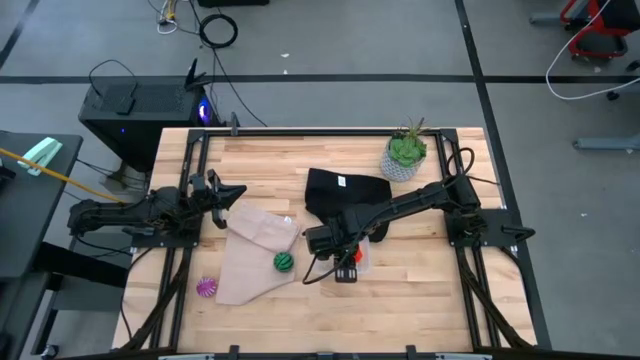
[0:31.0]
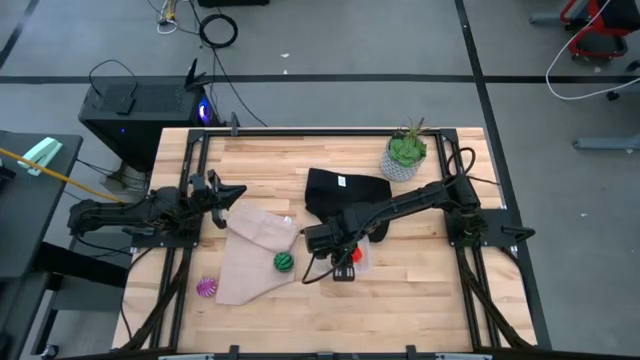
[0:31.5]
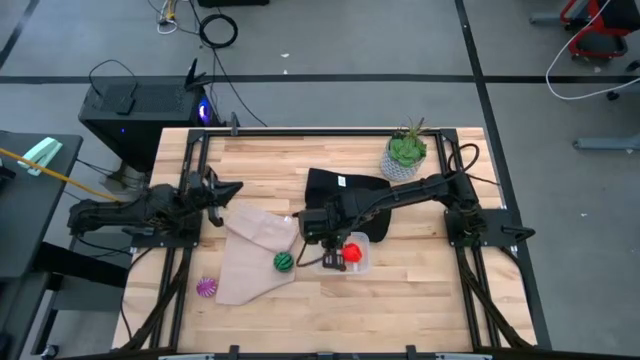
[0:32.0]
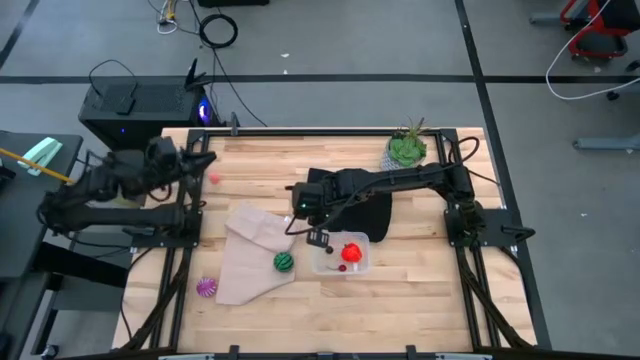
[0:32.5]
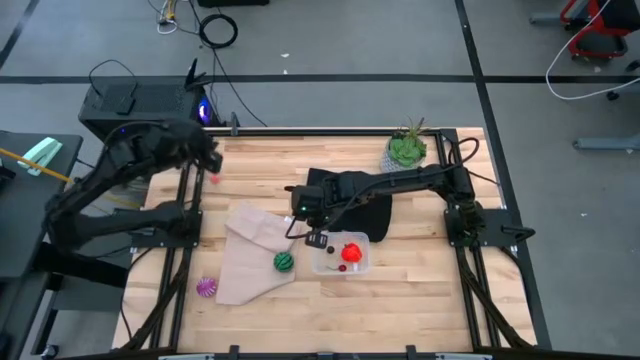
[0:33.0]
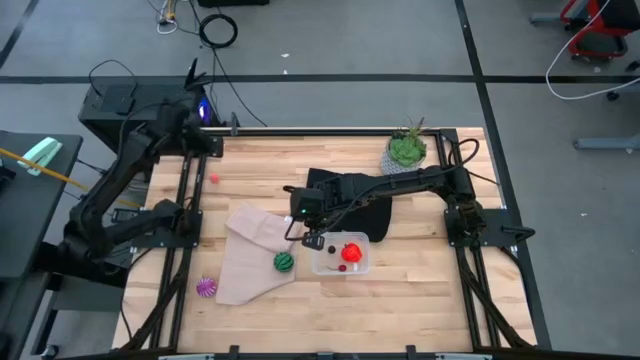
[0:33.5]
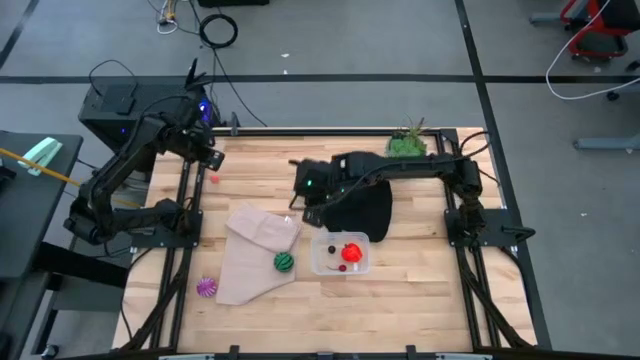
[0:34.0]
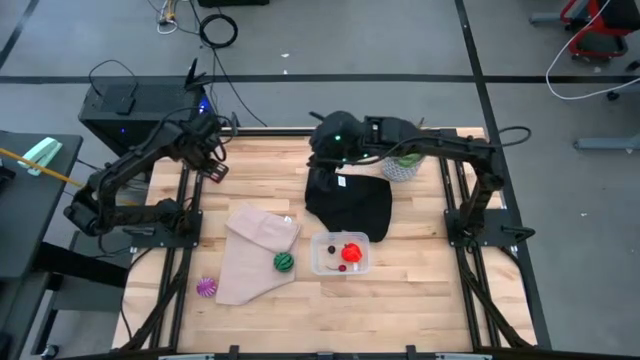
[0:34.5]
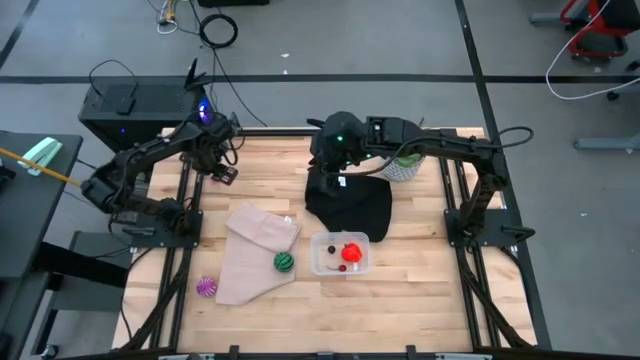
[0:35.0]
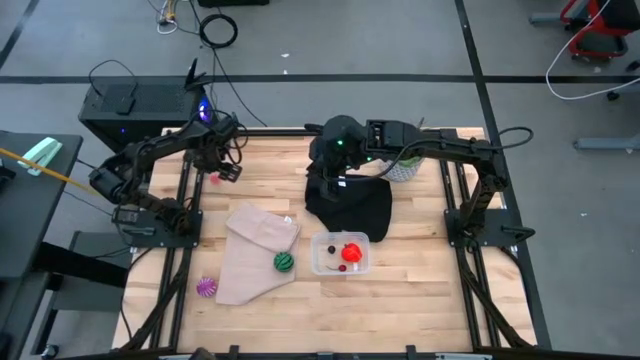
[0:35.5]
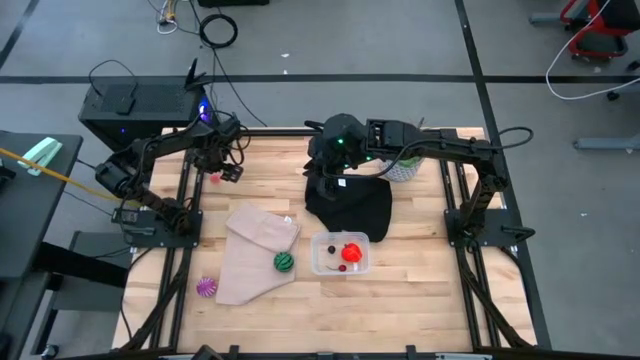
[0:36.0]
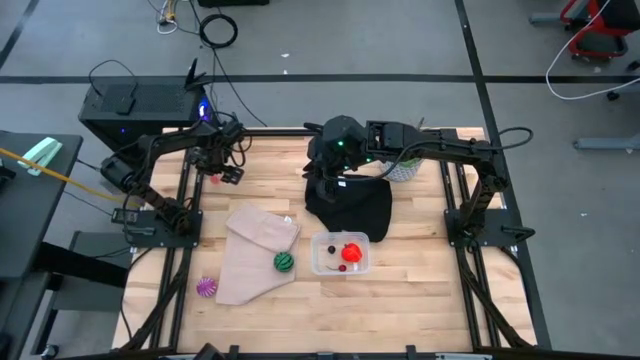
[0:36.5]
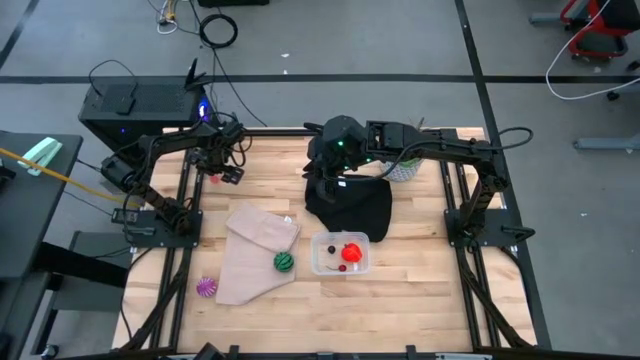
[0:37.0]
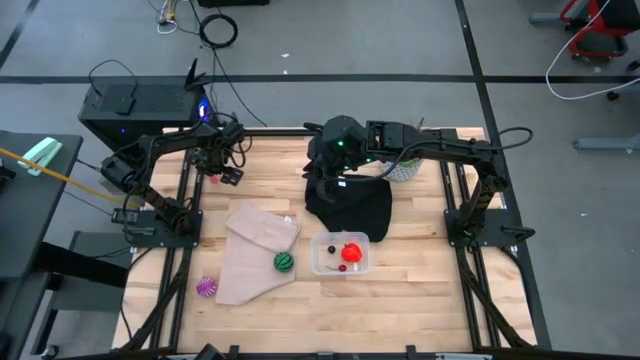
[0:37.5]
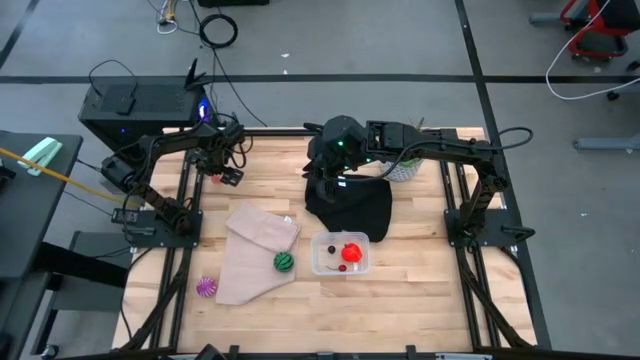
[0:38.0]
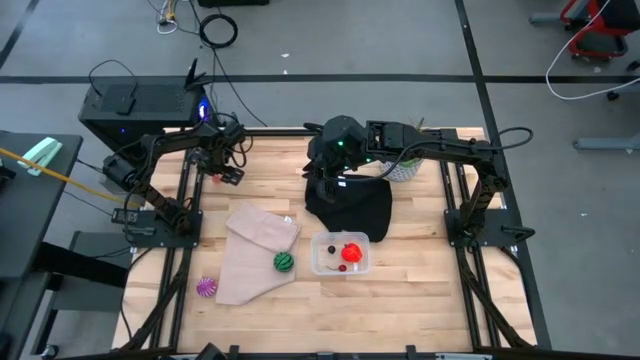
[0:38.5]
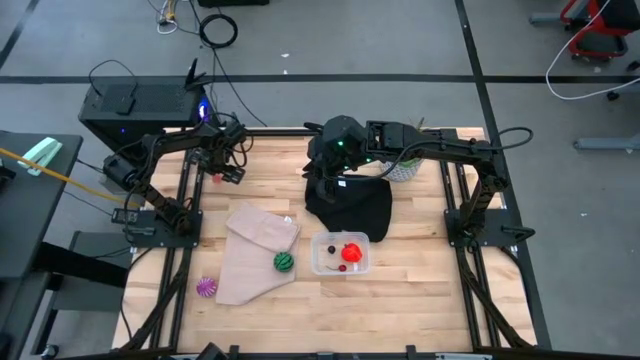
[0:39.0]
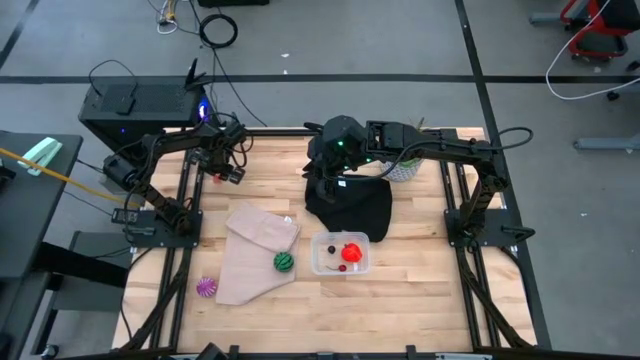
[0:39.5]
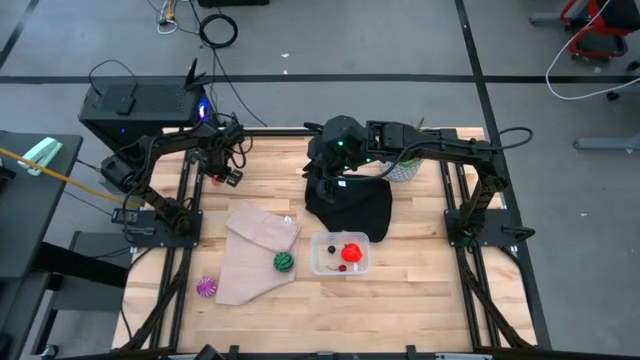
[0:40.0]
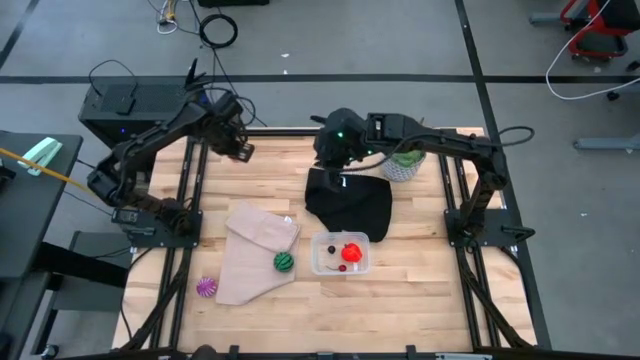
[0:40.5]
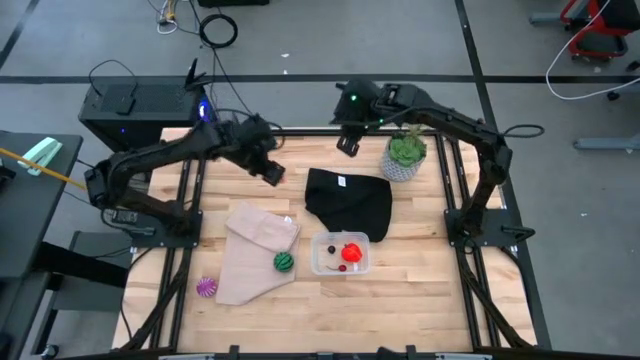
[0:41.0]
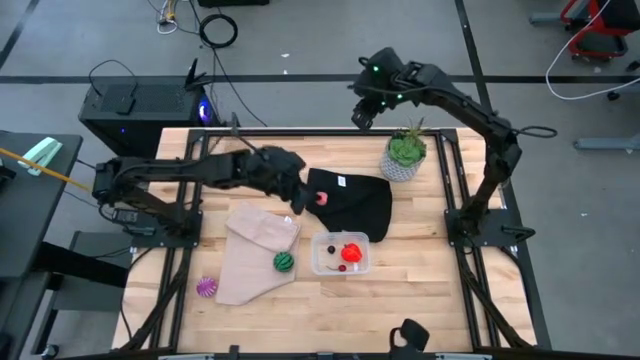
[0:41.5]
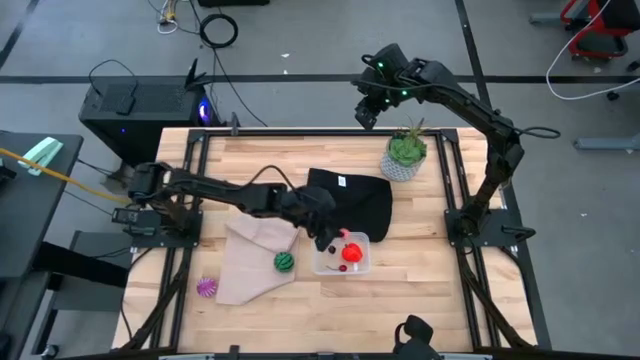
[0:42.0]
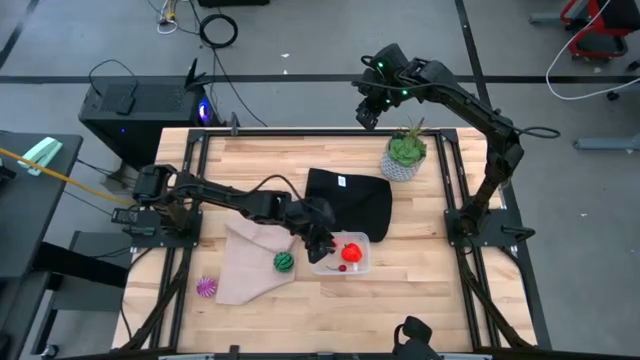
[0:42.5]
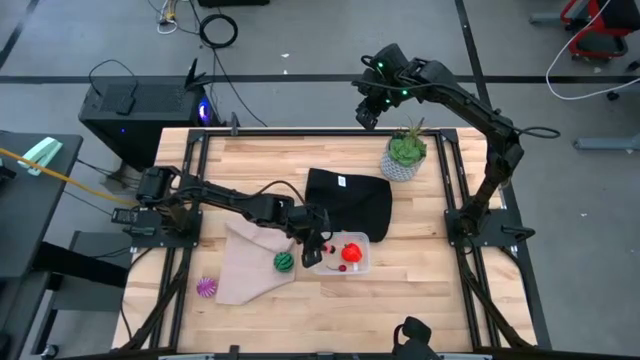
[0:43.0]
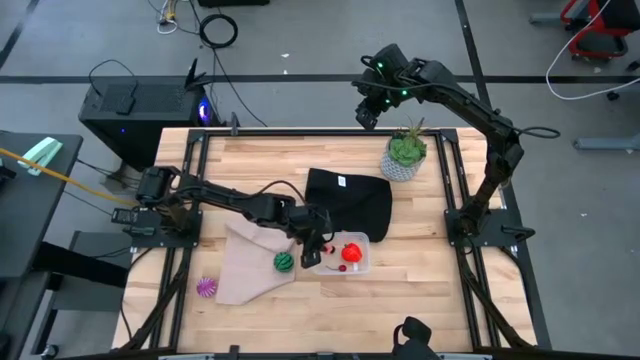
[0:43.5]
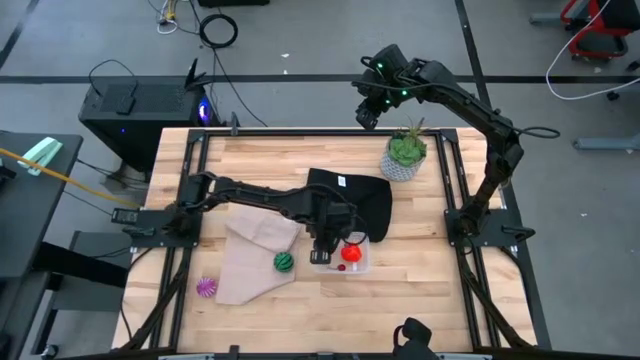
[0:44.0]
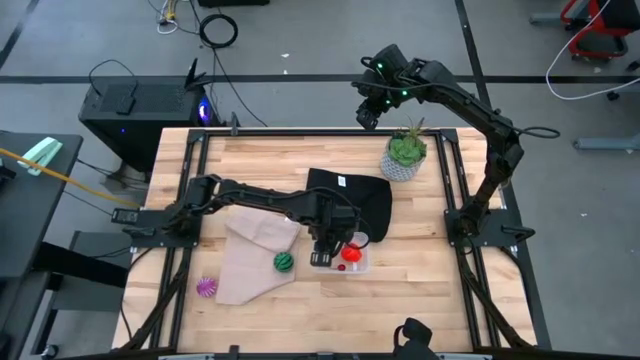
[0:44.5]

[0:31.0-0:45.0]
Task: Pick and placing Produce into tupperware
Put the peach into the transparent bin

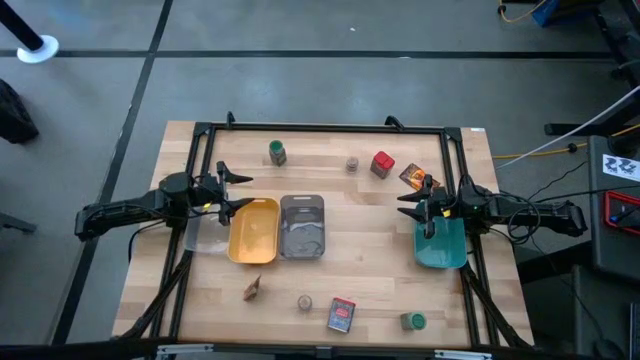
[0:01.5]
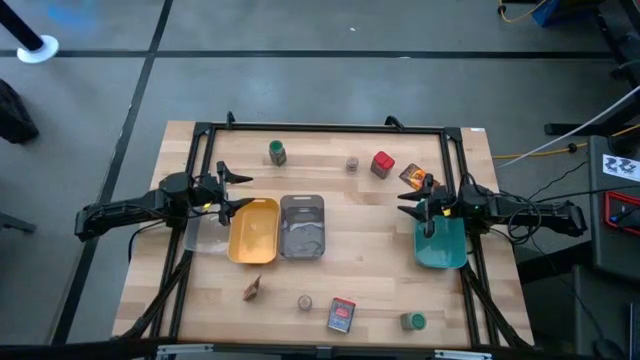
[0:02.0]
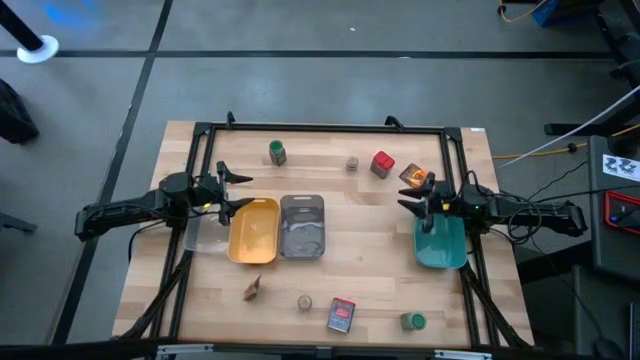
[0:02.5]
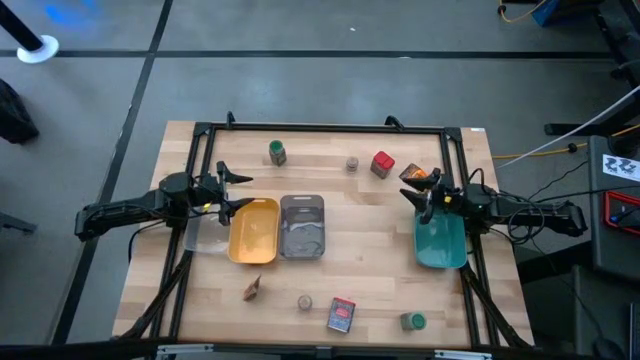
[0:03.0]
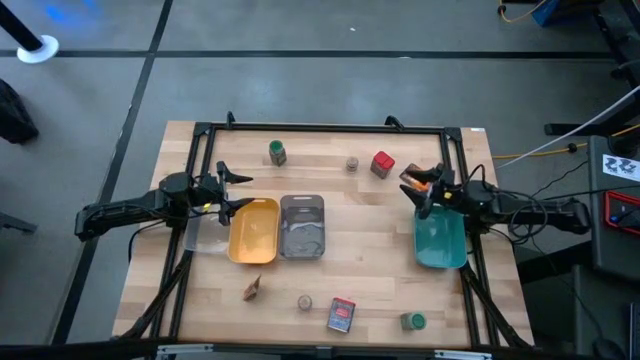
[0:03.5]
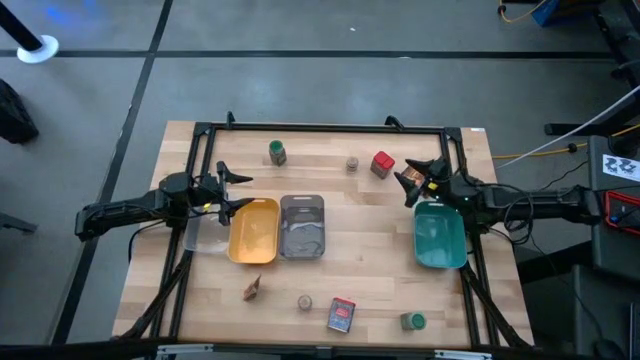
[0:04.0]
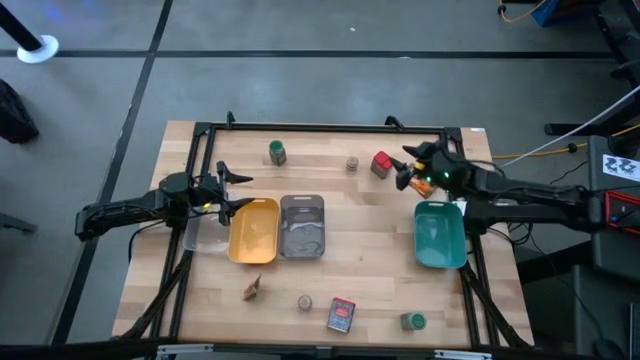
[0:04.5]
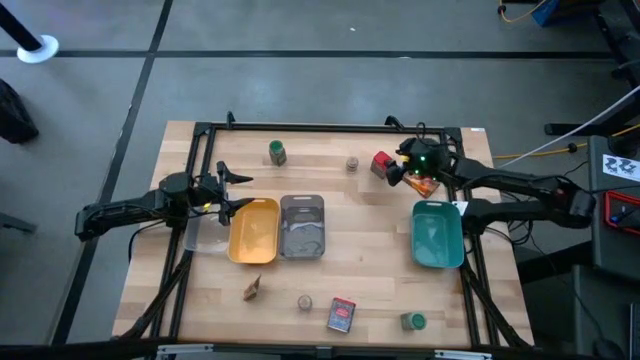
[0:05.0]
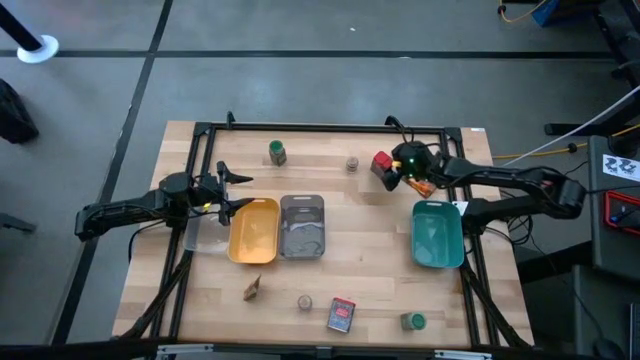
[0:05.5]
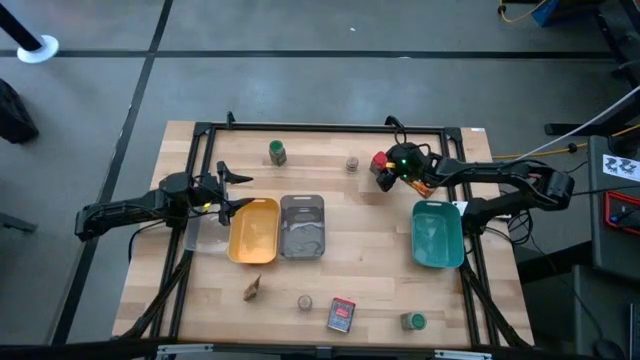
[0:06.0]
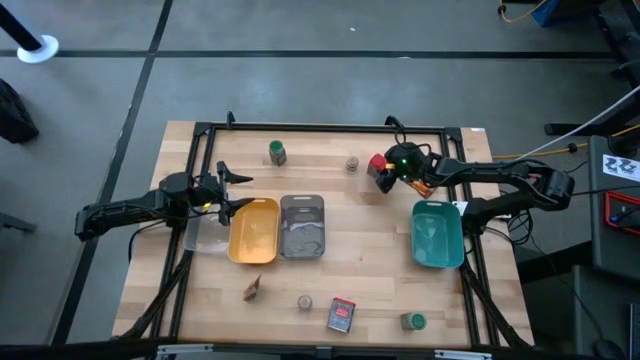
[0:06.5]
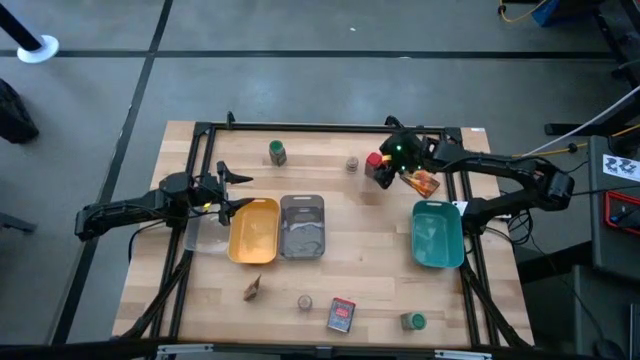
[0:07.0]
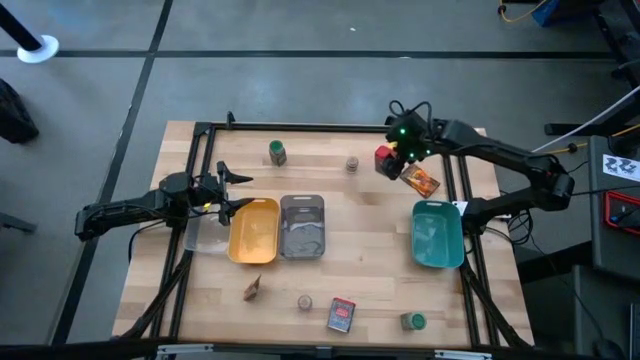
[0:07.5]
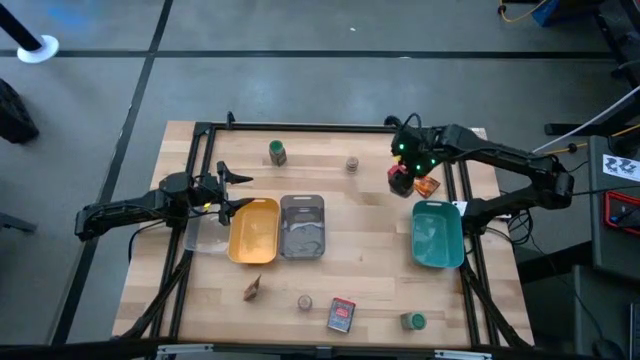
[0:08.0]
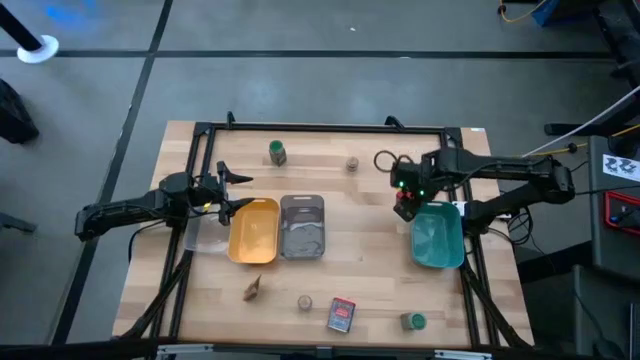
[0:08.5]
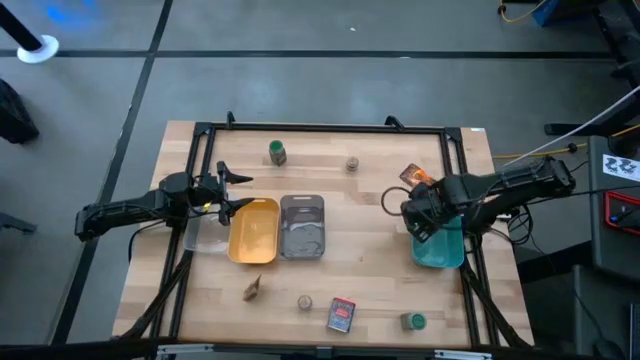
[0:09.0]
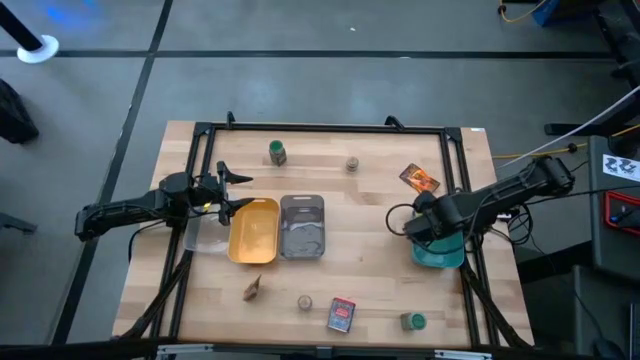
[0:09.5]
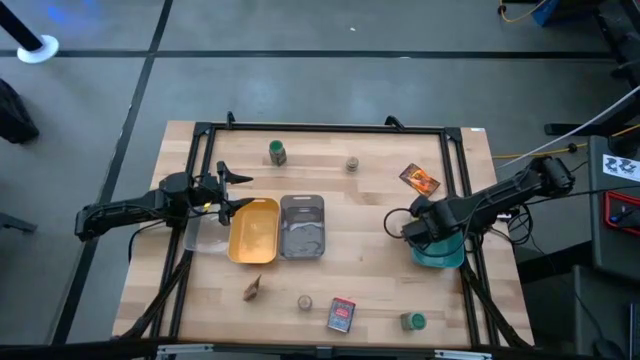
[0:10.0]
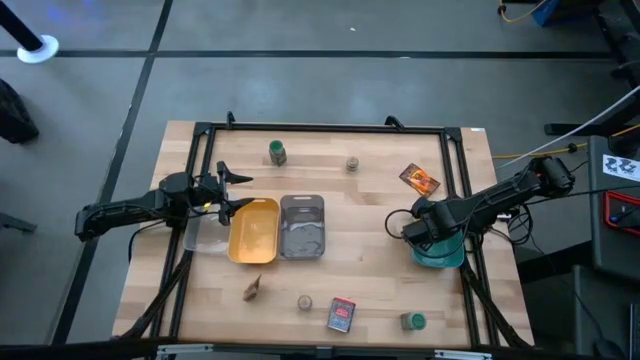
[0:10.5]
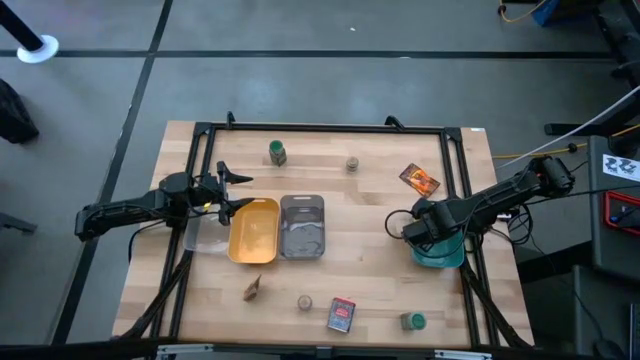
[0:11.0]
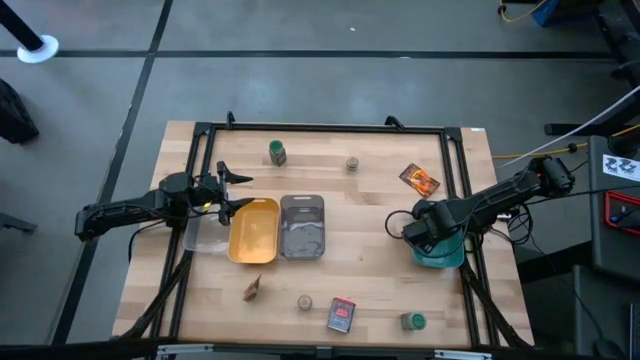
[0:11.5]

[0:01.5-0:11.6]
Task: Sort spices by type
Put the top right red spice can into the blue bin
